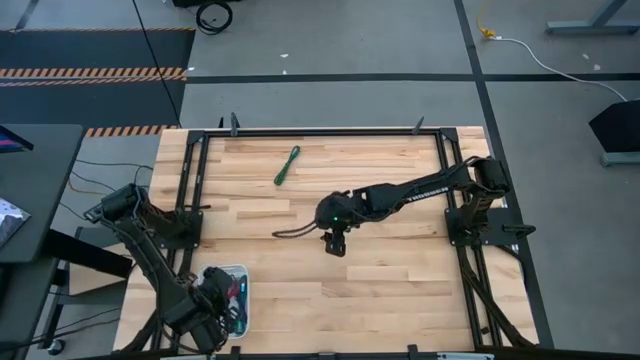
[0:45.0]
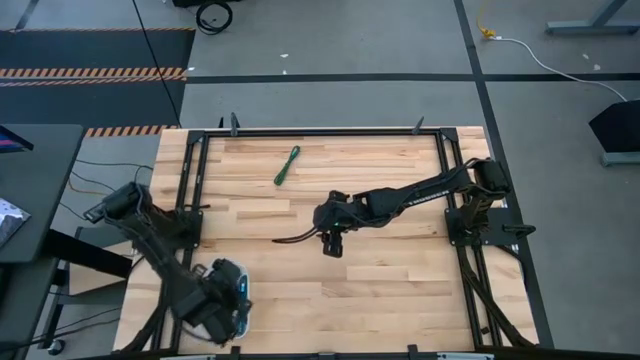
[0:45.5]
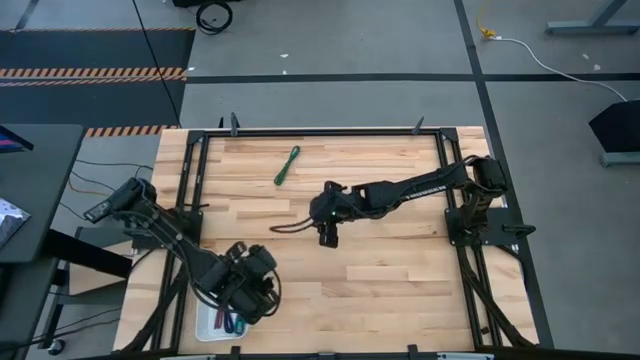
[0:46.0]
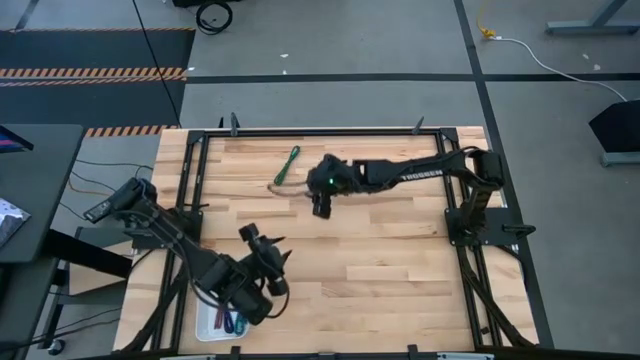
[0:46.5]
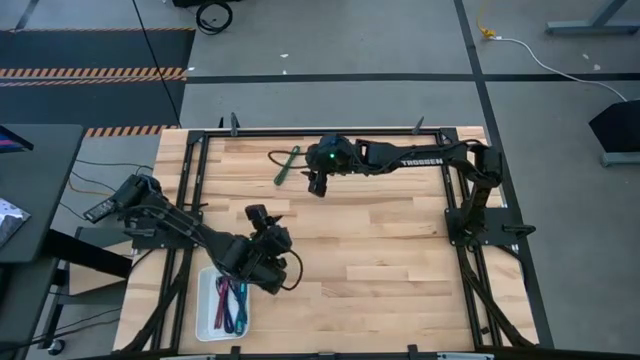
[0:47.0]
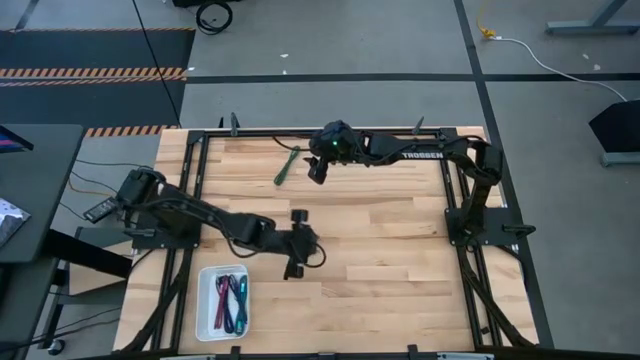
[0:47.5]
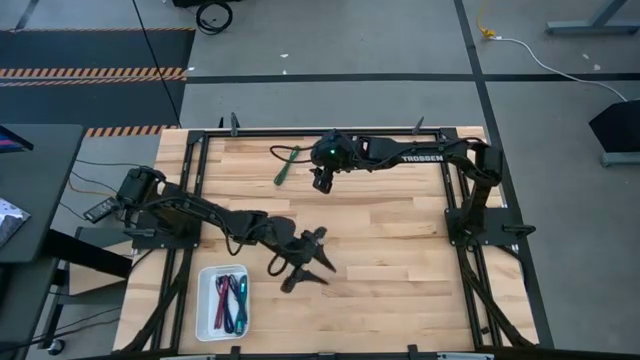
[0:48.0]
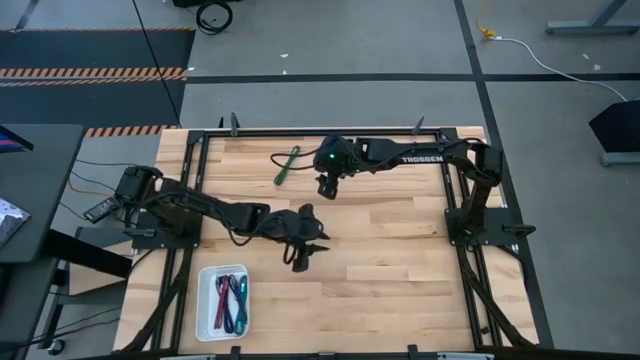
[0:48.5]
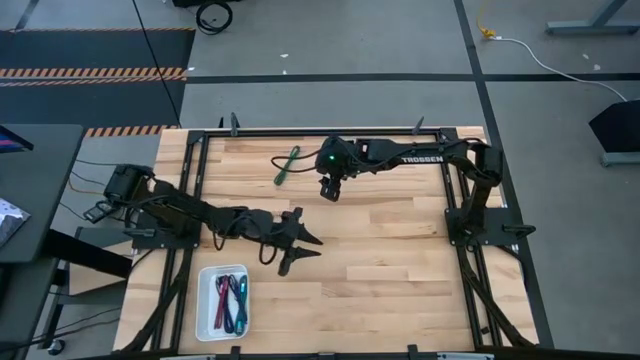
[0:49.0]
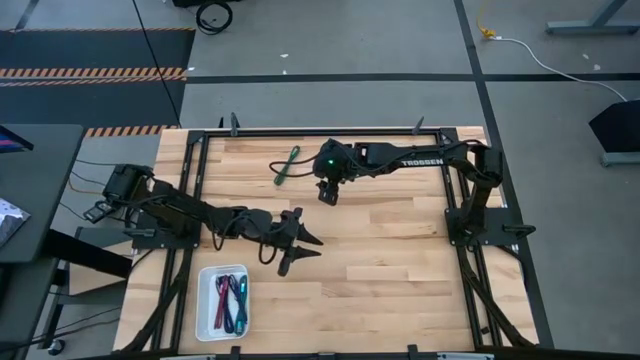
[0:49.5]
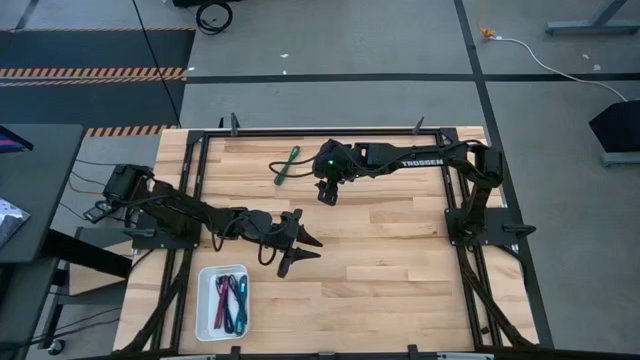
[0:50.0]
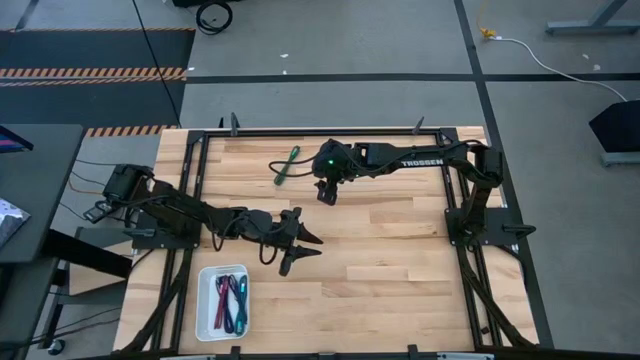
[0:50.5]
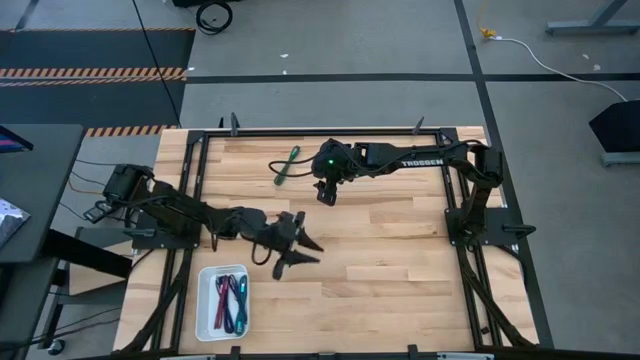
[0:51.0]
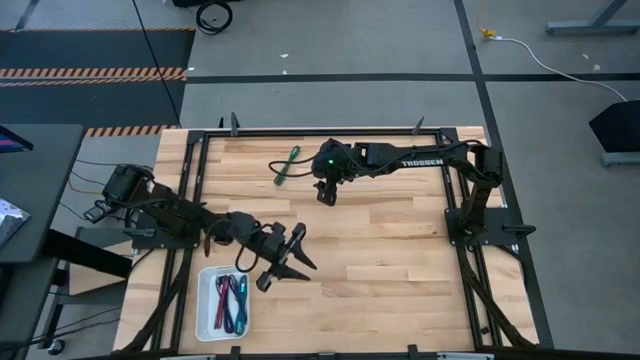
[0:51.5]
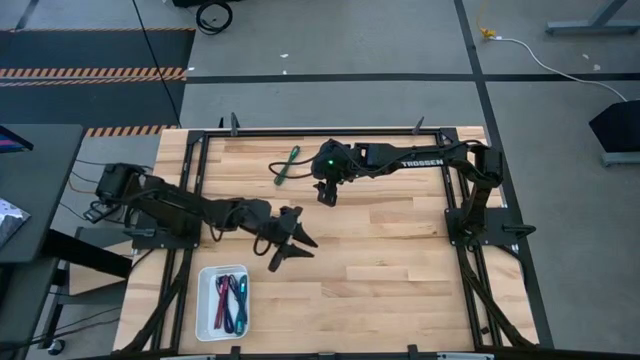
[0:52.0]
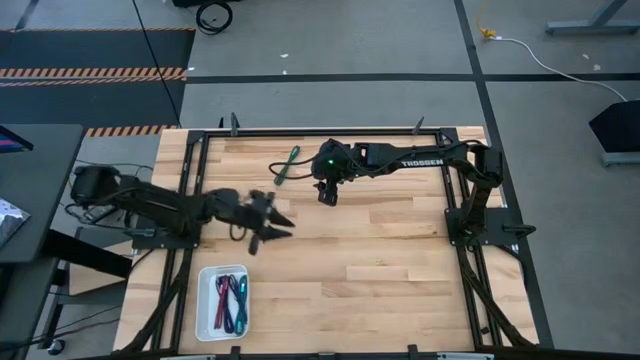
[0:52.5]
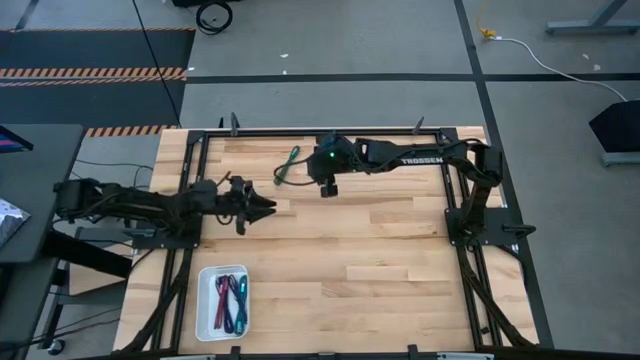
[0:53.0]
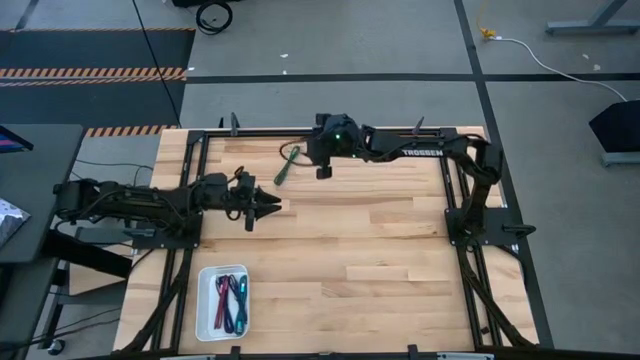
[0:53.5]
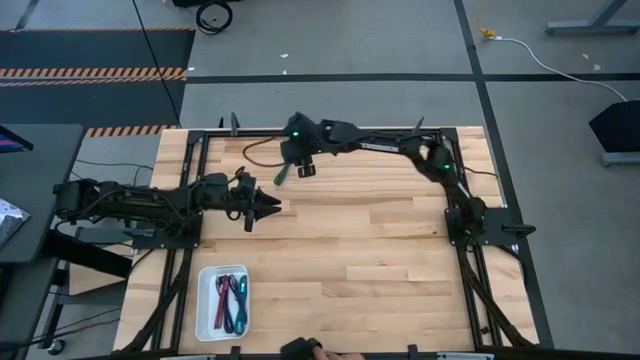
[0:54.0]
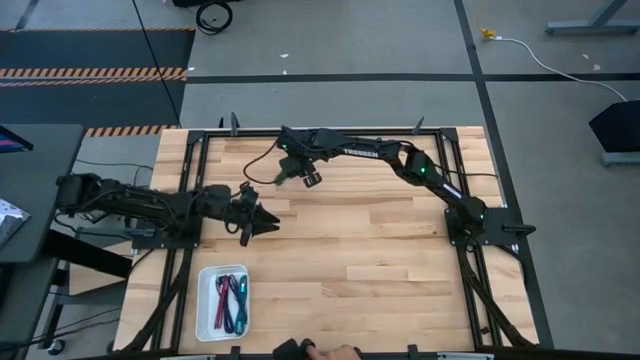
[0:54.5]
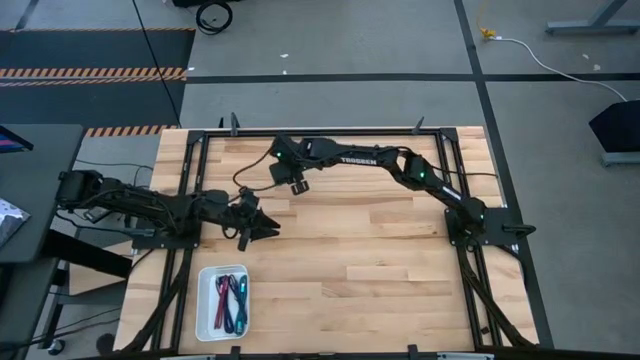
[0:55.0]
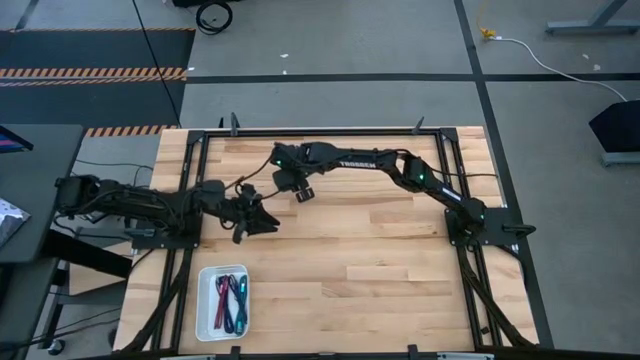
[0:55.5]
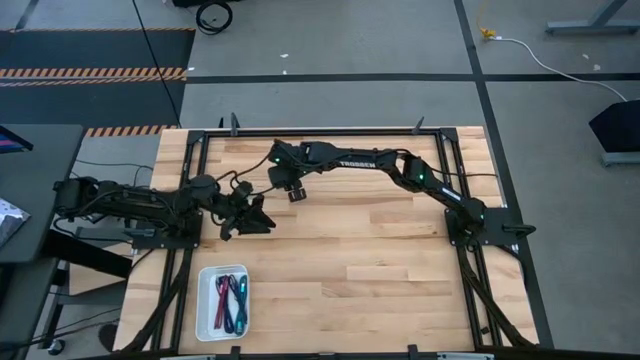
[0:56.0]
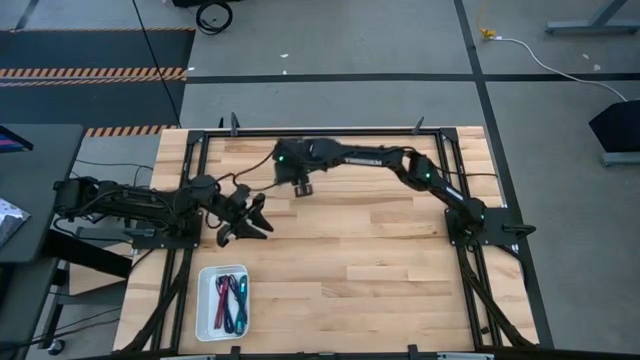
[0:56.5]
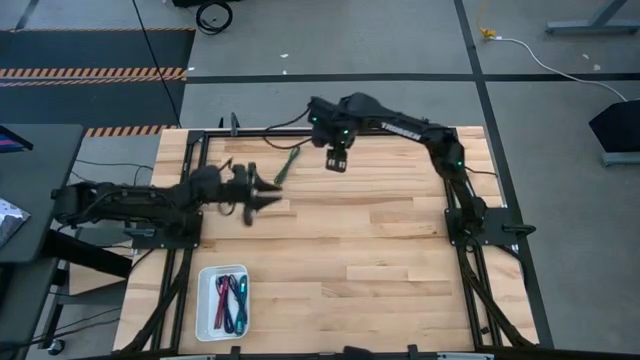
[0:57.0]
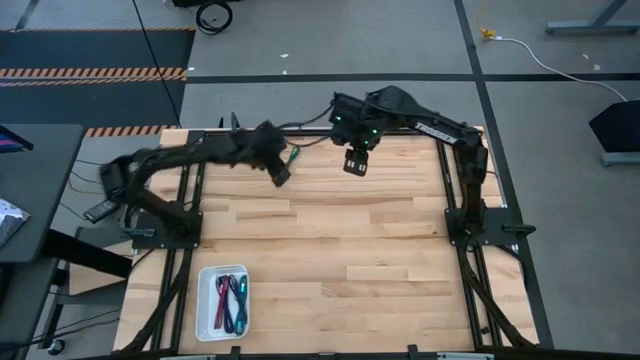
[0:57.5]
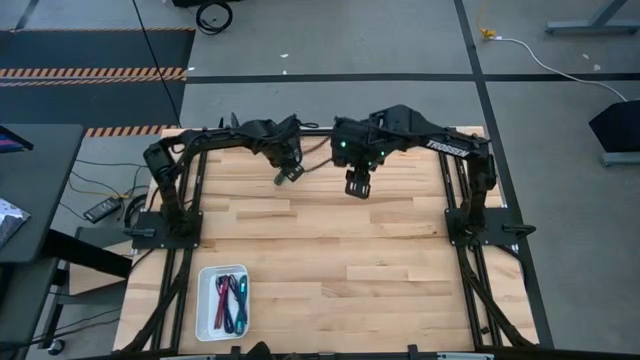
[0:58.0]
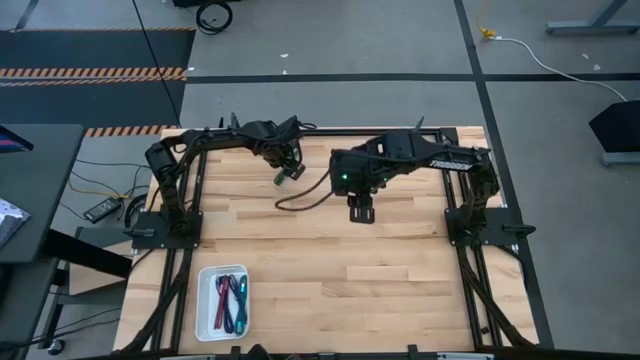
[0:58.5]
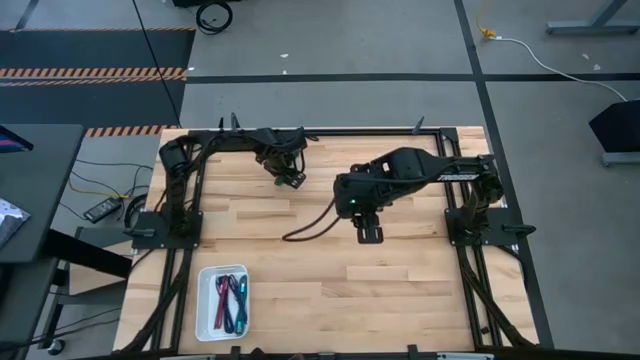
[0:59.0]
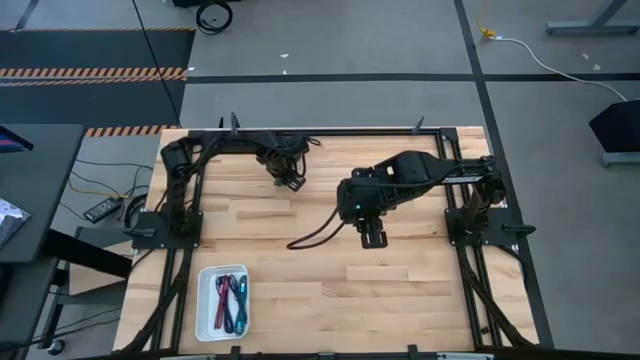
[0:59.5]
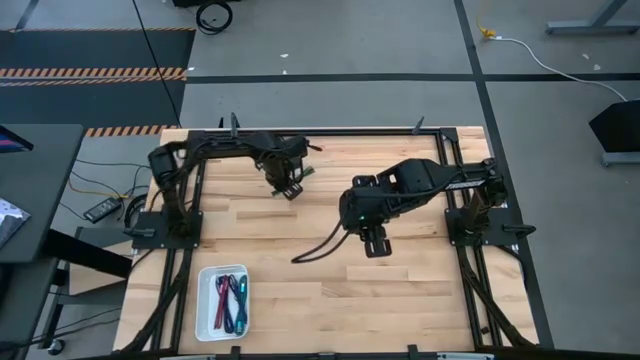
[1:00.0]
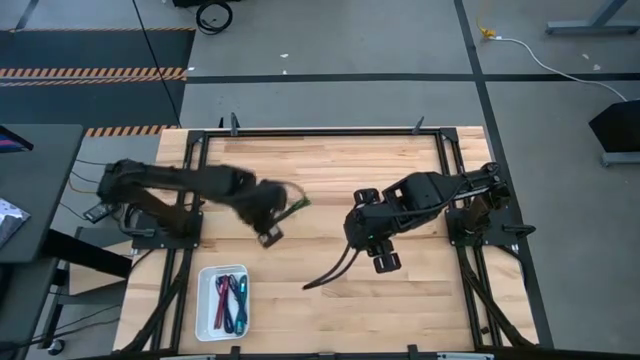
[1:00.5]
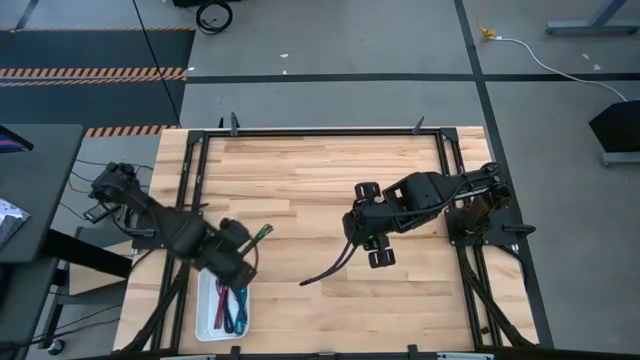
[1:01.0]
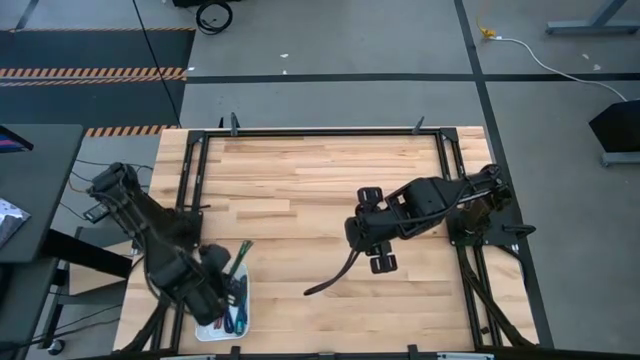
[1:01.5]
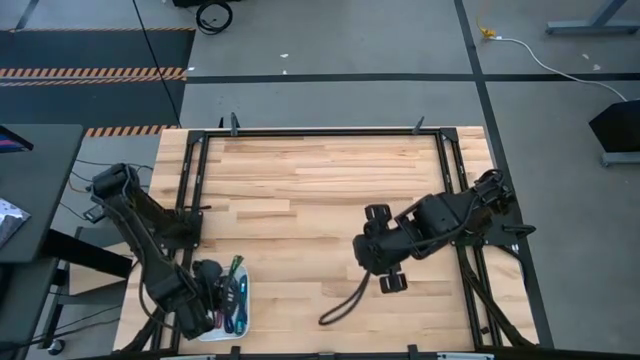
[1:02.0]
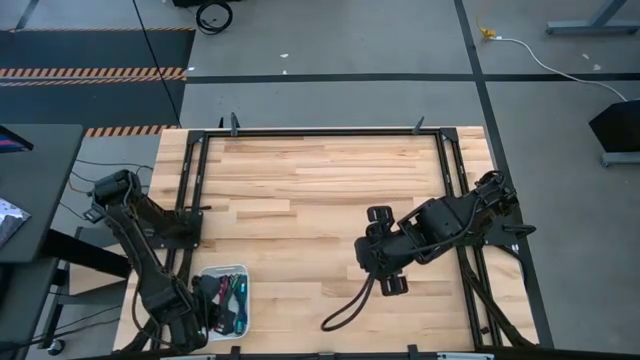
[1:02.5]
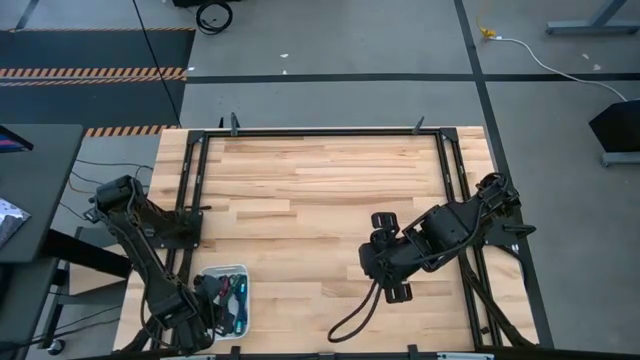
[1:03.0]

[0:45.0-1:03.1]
Task: Pick and place USB-C Cables
Put the green charger cable into the bin
